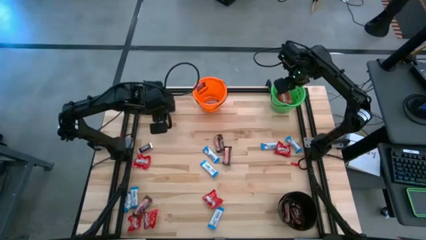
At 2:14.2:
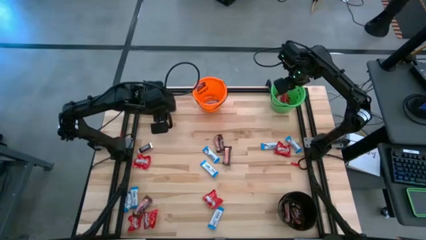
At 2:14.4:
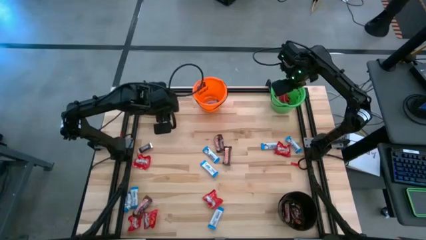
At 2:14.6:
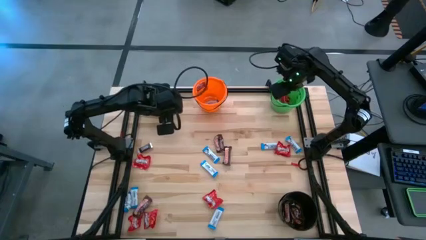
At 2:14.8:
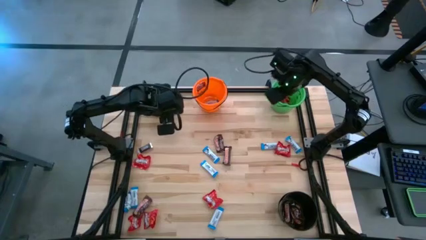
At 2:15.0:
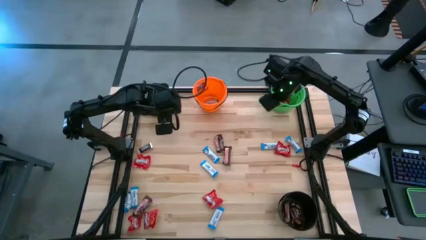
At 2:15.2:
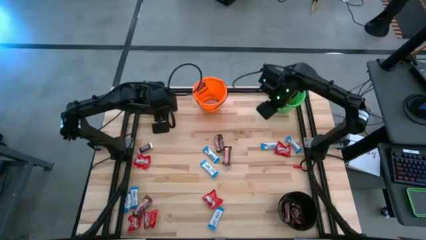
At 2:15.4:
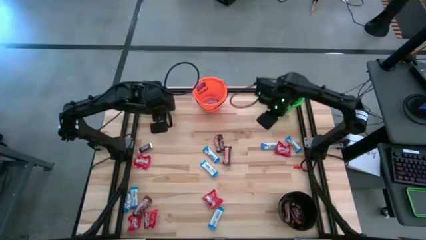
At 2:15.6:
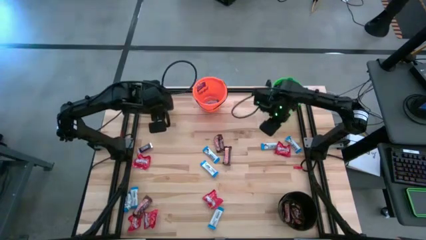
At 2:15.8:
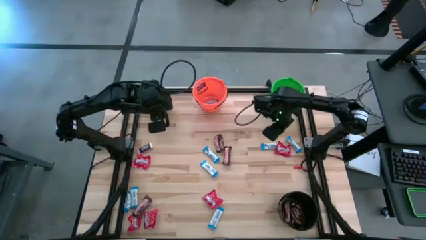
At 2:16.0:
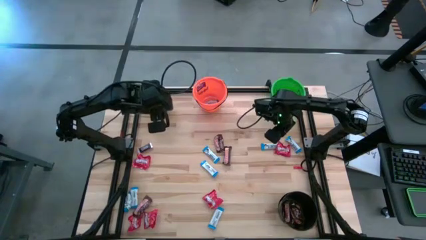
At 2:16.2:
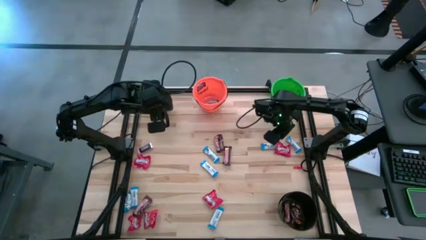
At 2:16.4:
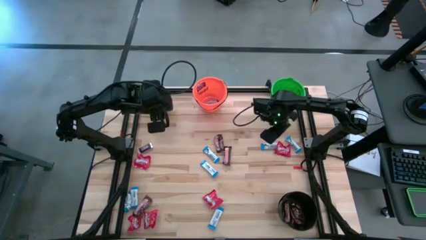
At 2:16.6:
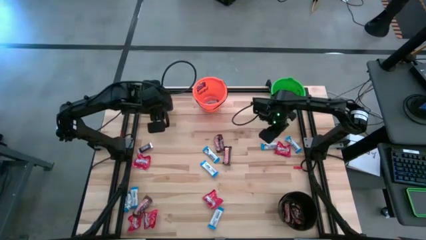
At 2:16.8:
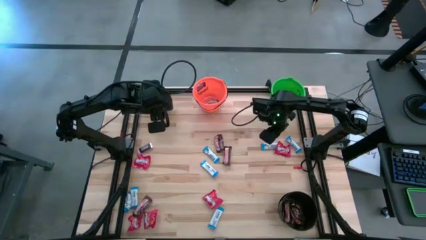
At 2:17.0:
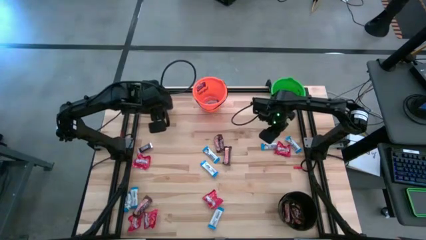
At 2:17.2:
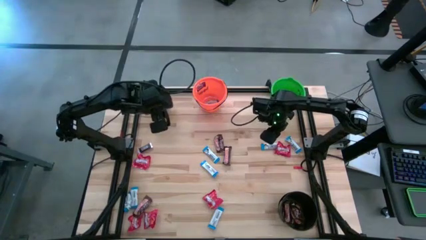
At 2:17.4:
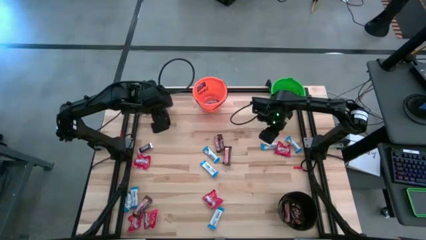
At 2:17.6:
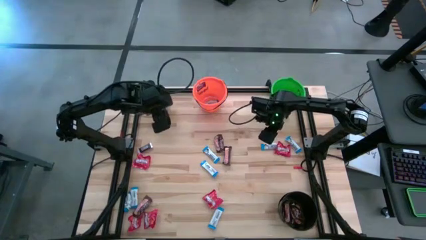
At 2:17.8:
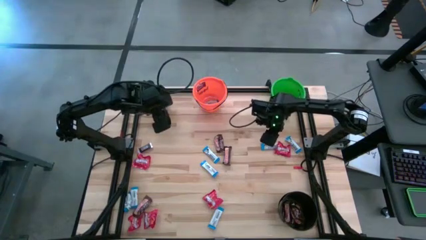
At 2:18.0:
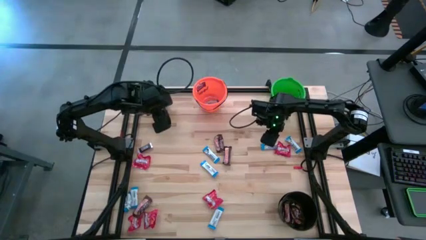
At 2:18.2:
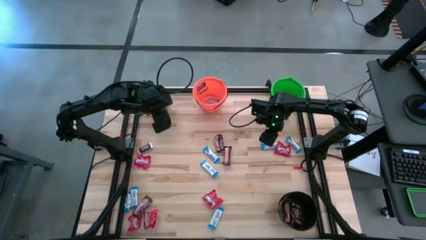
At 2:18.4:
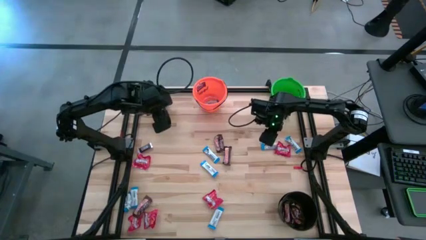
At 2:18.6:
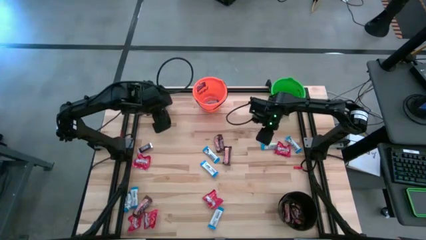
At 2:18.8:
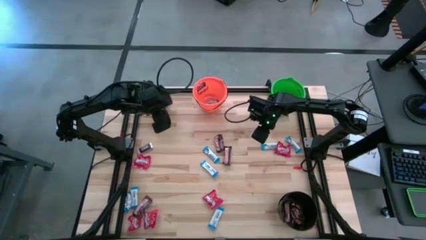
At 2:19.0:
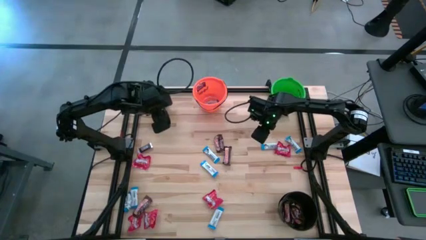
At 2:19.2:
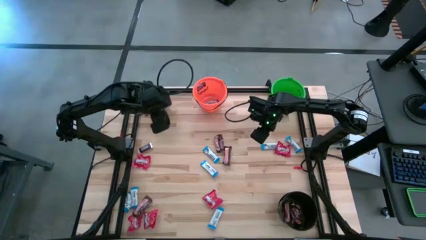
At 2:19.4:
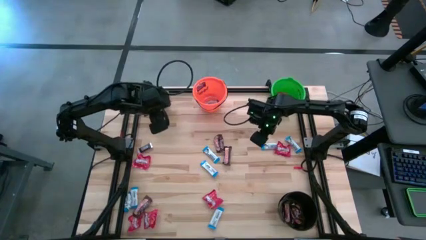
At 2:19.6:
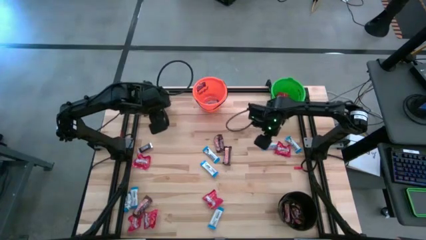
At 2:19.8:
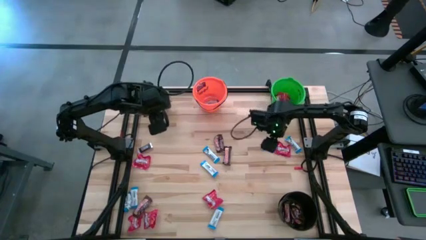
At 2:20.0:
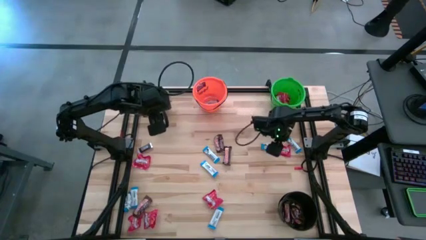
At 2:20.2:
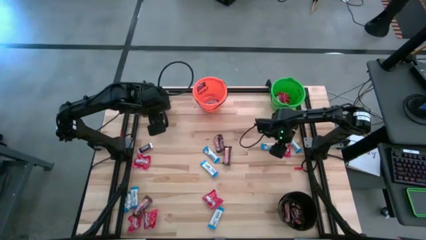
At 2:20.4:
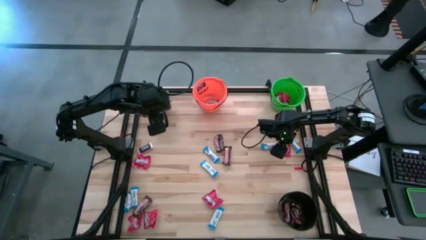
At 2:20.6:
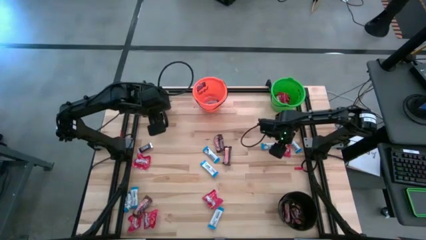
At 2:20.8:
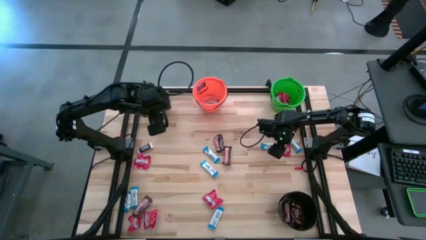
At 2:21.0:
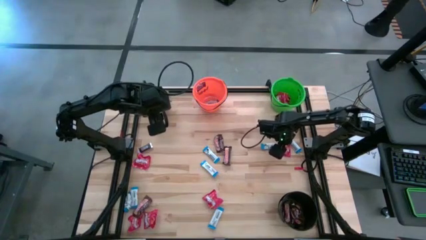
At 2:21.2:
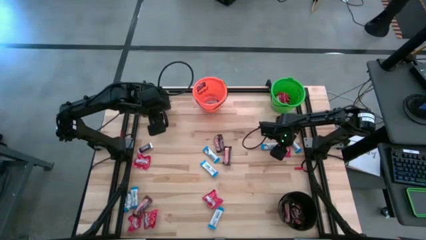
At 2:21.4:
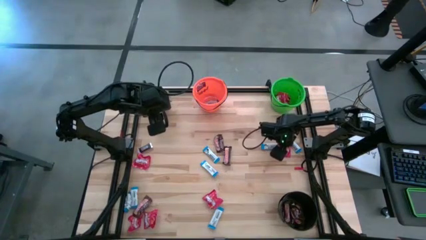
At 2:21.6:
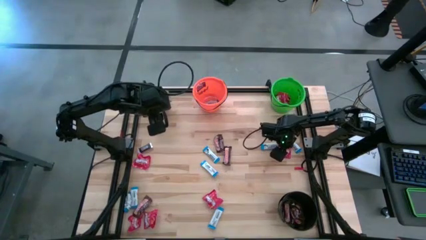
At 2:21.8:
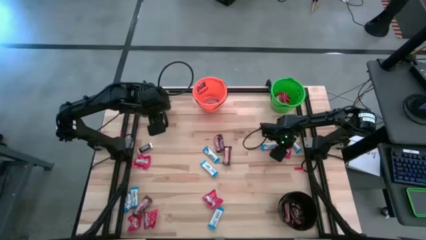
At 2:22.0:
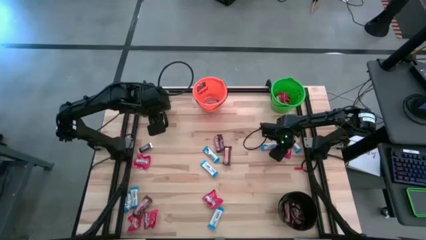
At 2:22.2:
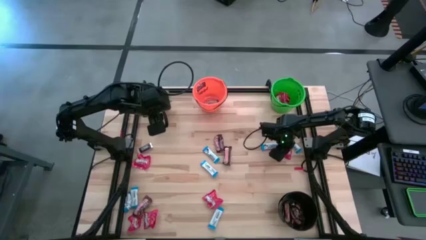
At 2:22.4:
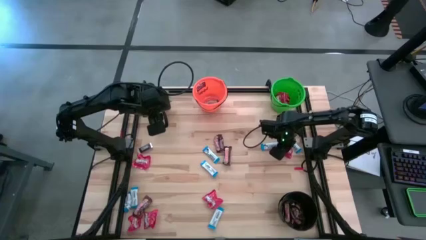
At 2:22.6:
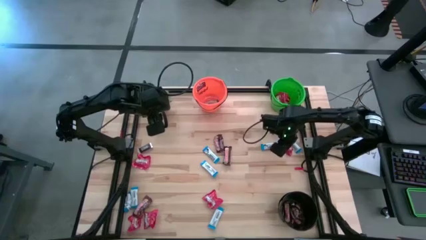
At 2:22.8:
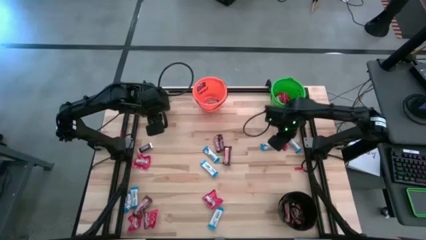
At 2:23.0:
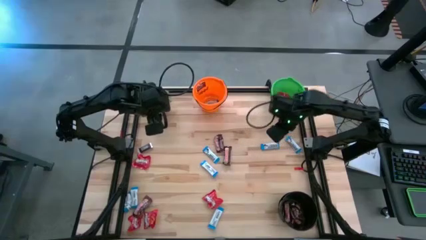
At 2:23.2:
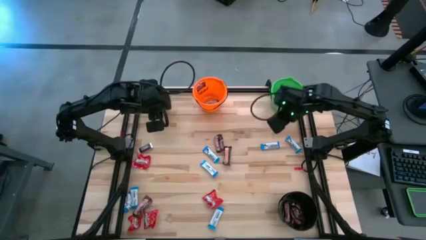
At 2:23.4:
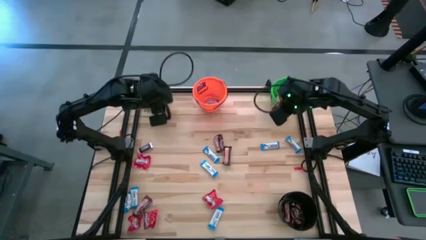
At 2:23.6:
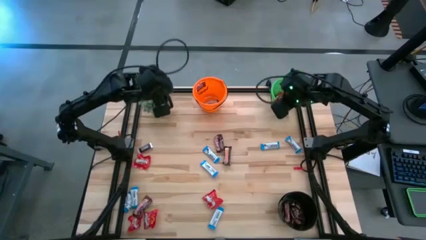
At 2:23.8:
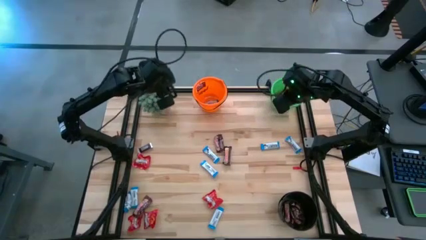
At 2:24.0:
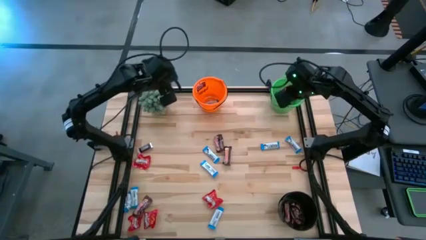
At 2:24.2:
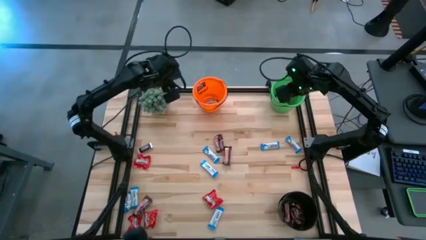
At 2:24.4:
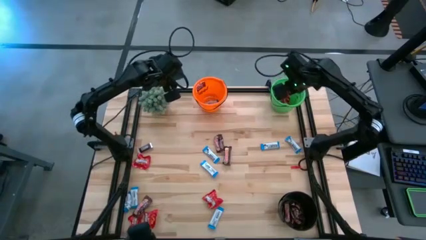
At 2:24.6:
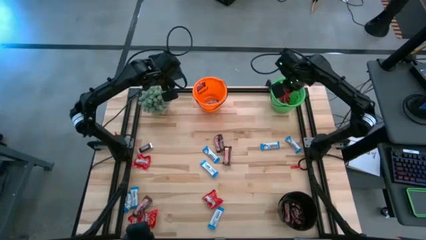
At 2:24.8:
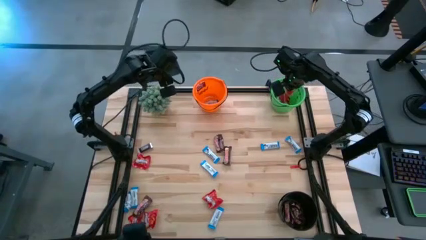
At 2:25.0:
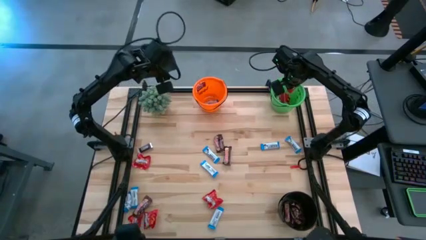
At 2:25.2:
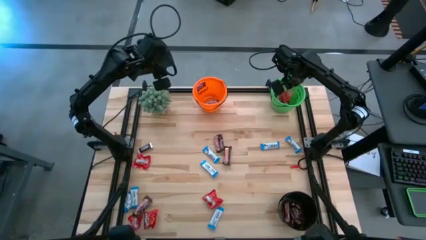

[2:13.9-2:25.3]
Task: Organize candy in baskets
Put the red candy into the green bucket
